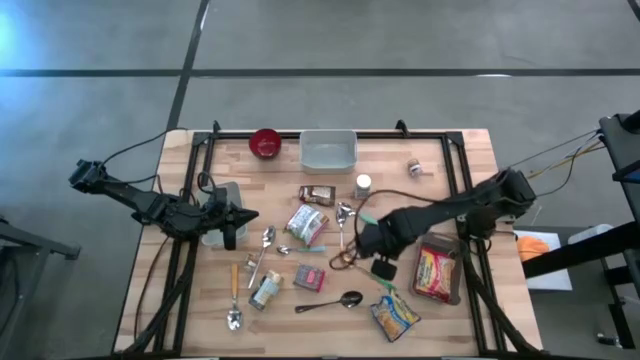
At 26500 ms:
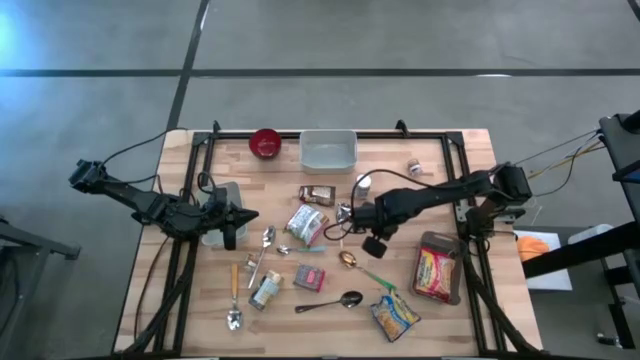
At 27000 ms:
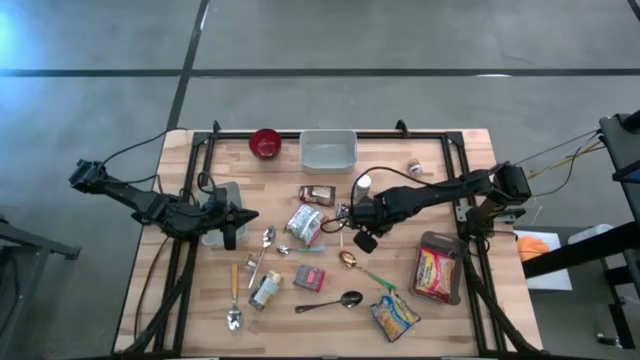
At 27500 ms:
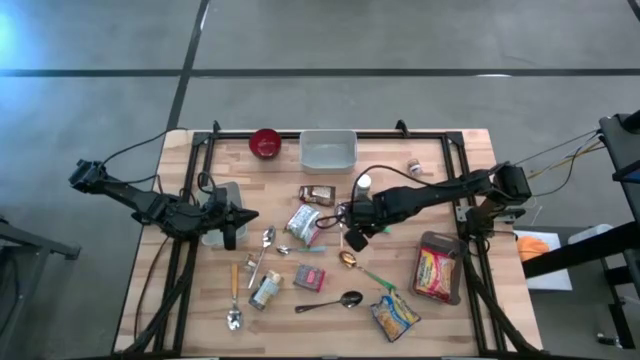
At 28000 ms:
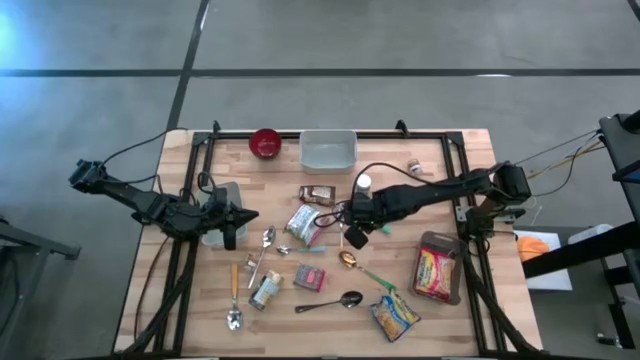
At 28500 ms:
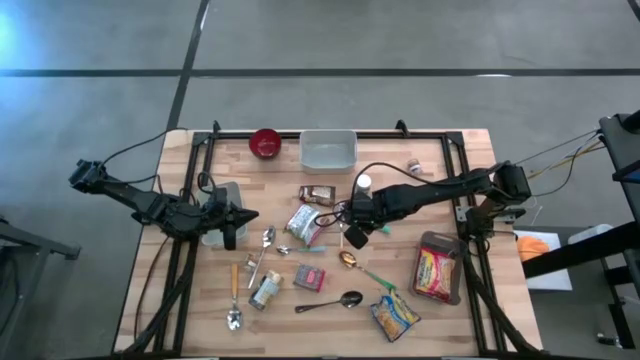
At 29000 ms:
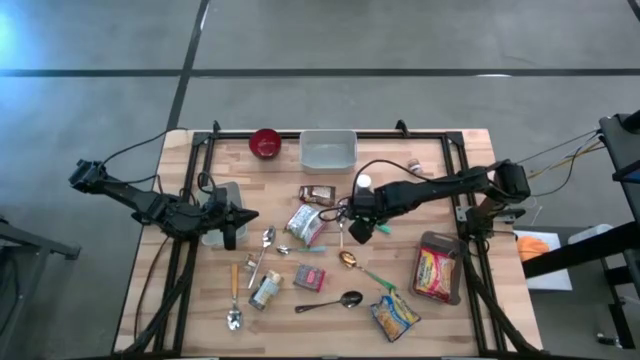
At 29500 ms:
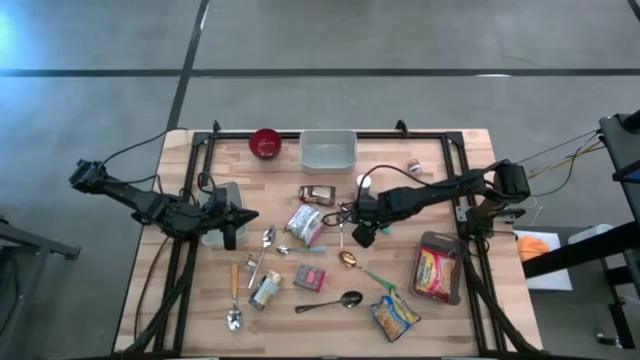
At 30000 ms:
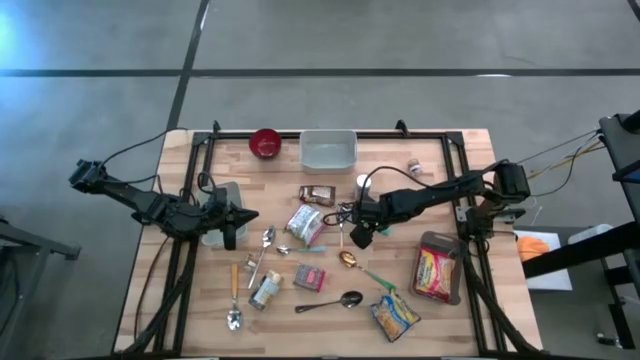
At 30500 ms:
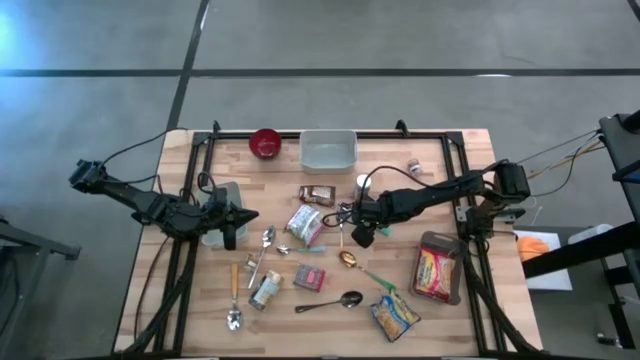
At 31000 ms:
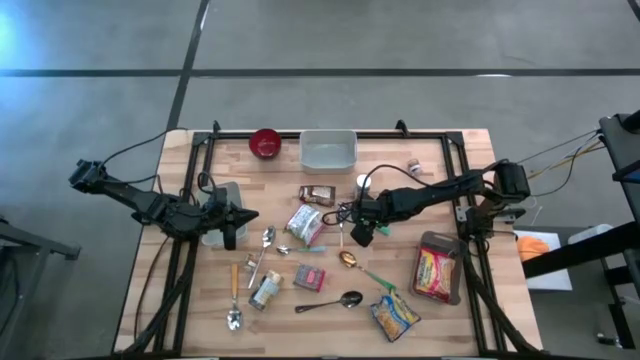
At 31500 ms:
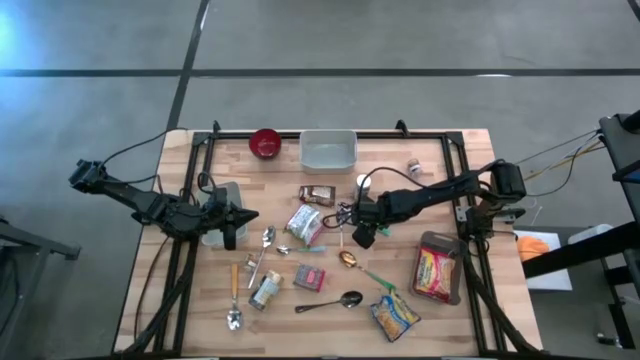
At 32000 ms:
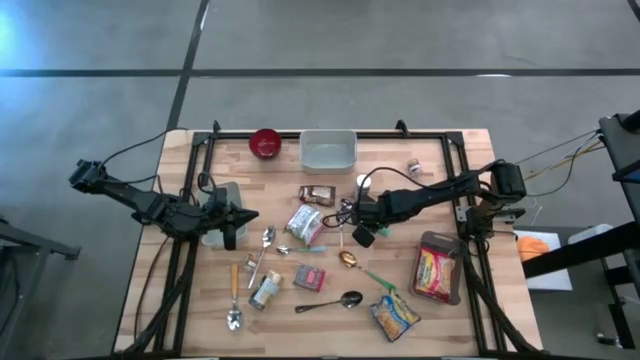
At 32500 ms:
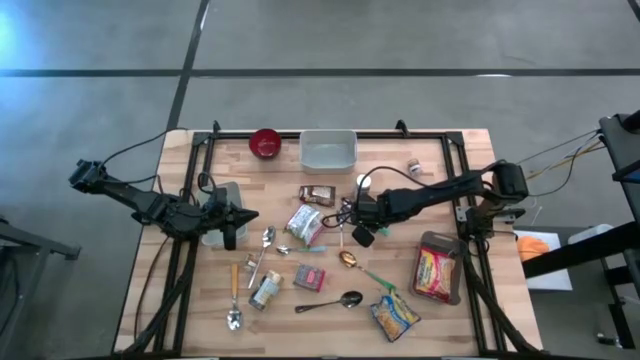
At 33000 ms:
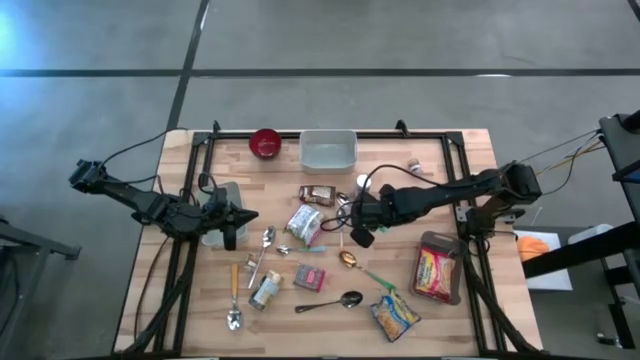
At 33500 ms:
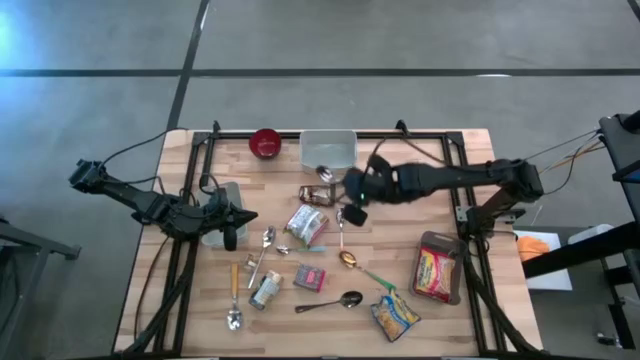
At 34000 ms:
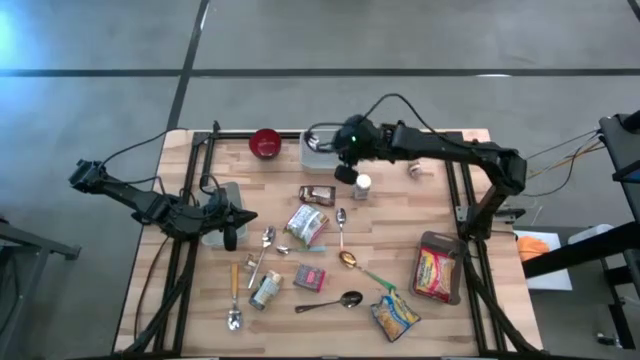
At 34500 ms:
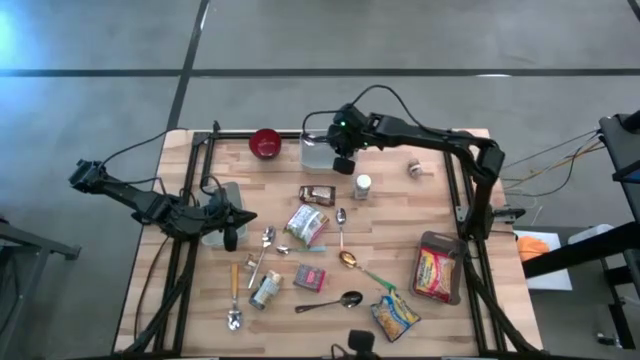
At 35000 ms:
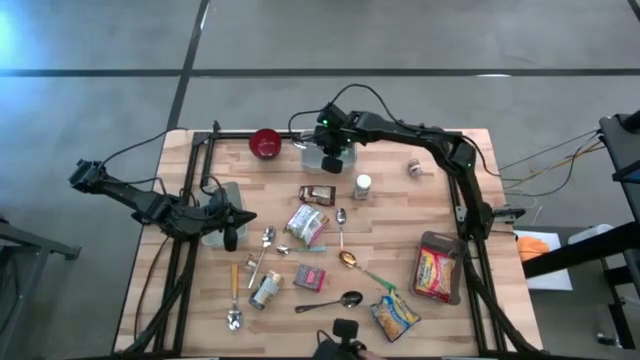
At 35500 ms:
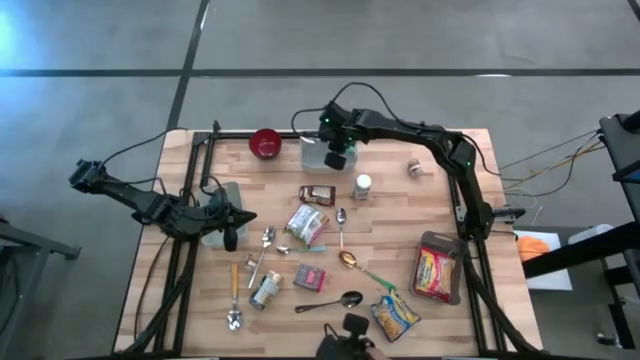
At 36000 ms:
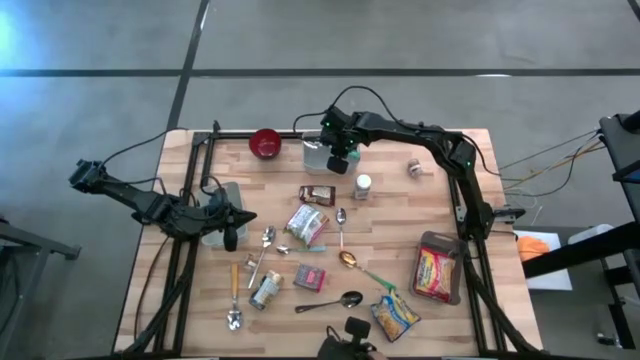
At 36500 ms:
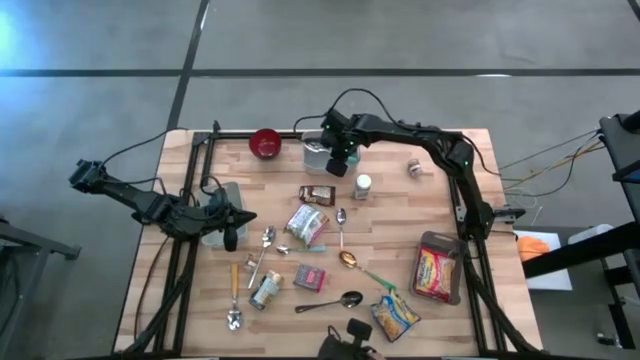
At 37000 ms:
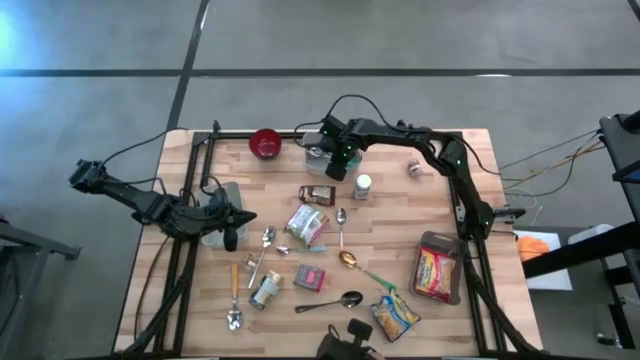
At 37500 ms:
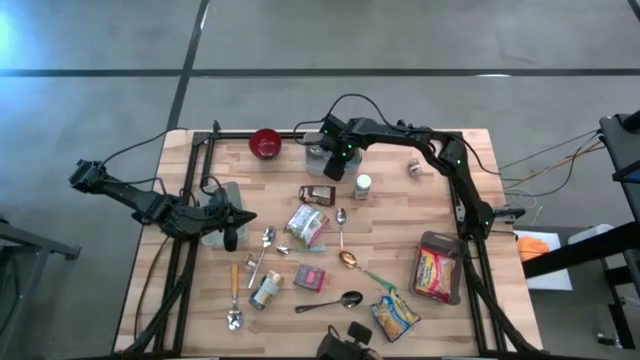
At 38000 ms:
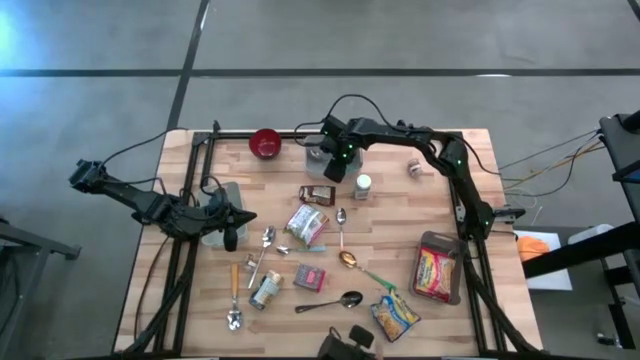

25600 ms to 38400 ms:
Put the right blue spoon into the right gray bin

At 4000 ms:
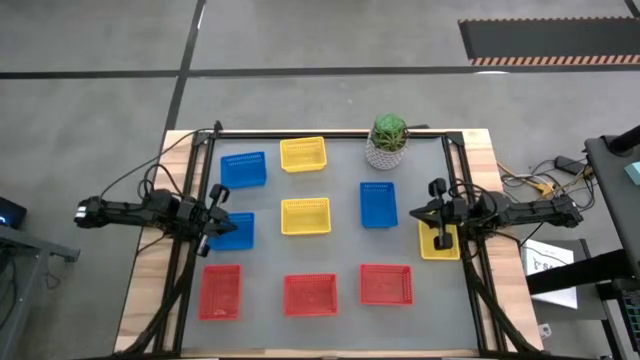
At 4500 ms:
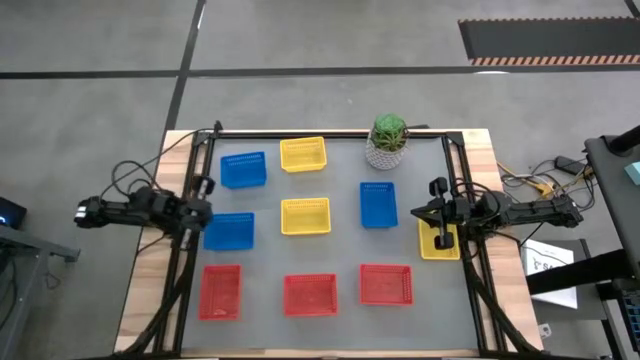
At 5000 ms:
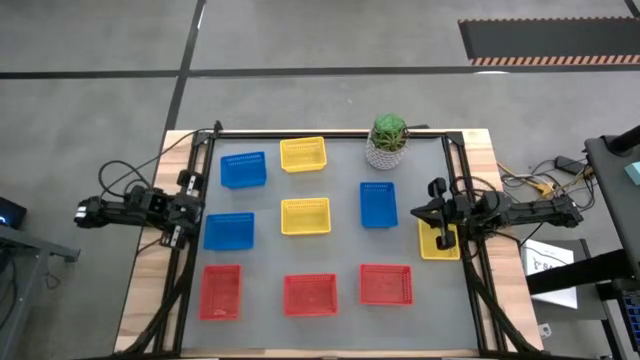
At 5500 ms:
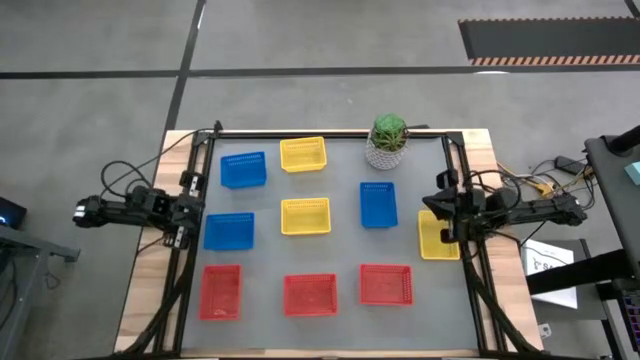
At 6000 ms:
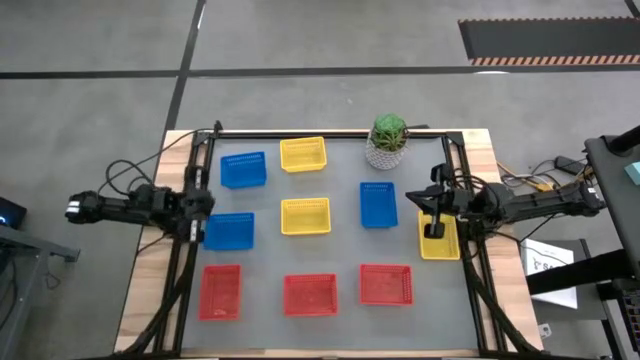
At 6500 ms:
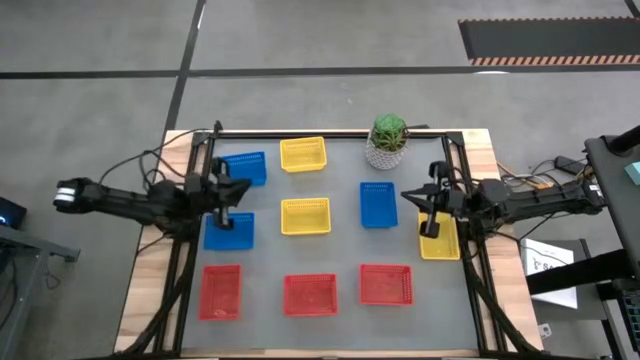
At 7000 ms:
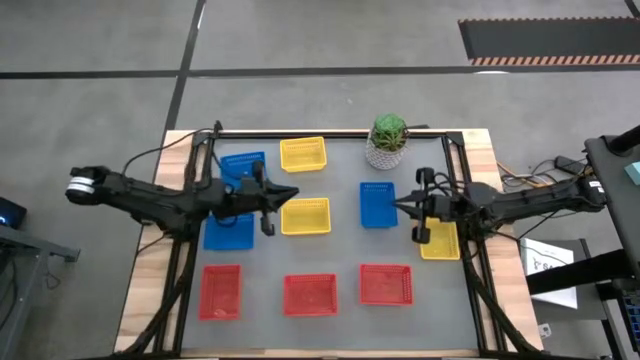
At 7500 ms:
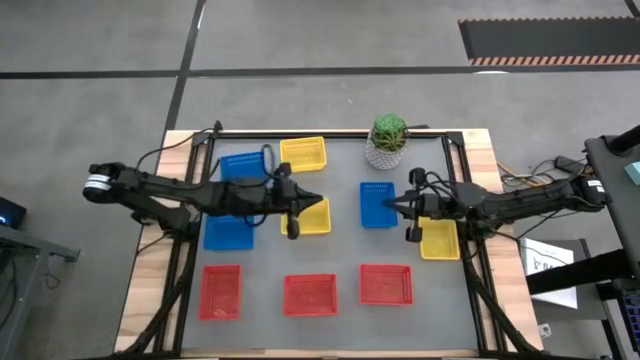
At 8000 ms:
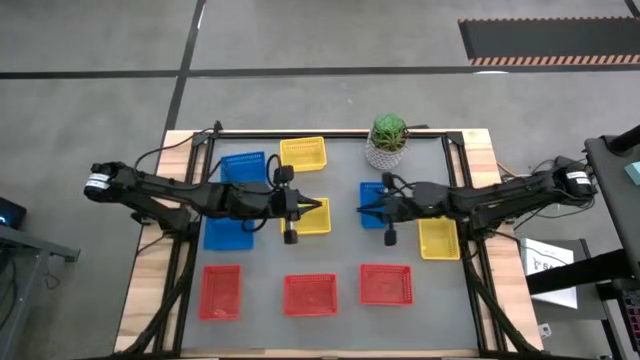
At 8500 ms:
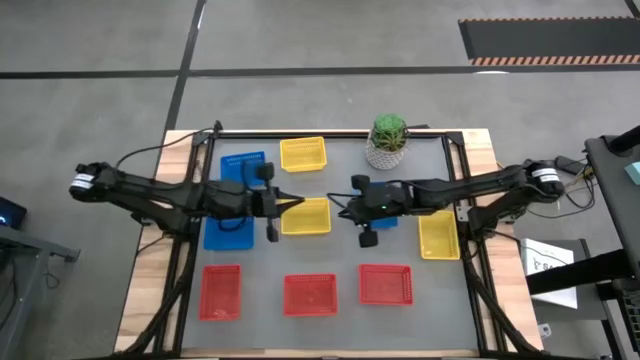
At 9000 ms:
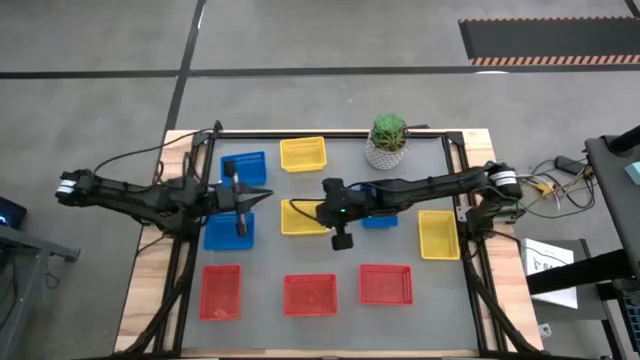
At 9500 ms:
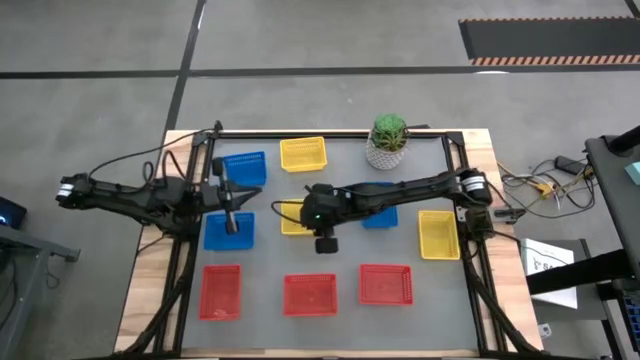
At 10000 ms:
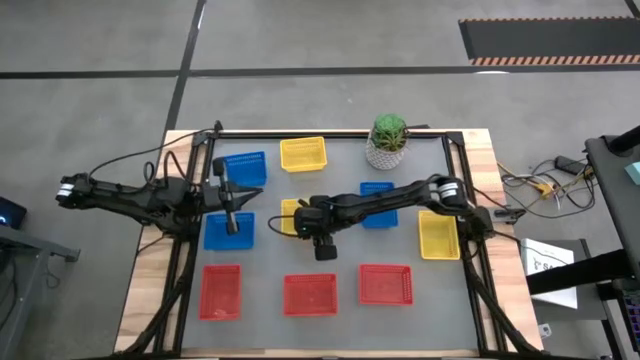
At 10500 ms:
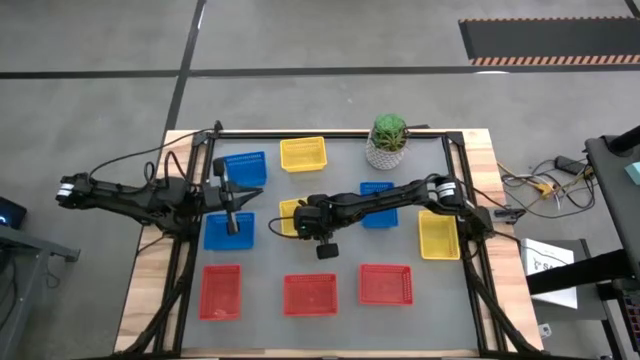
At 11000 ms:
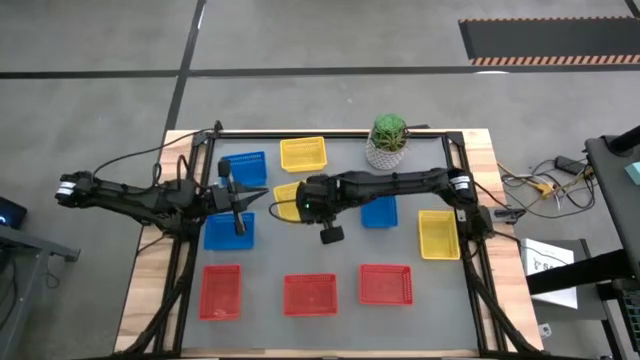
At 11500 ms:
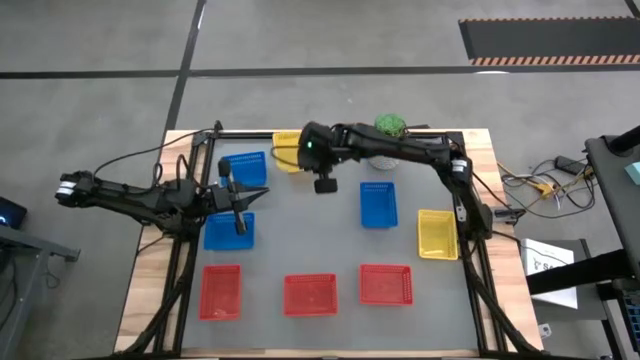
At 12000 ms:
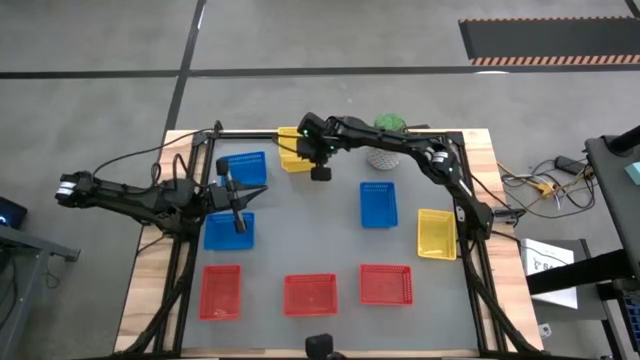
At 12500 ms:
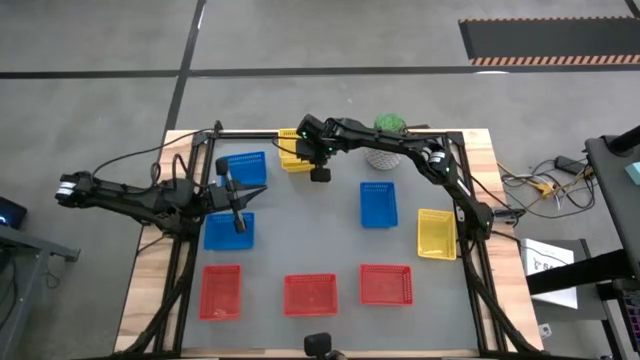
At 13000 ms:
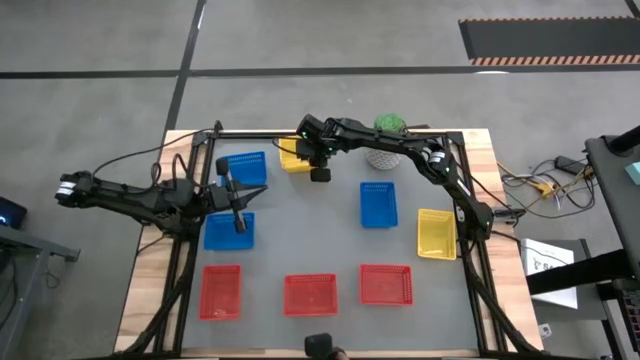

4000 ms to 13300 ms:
Stack the bottom yellow basket on top of the top yellow basket
